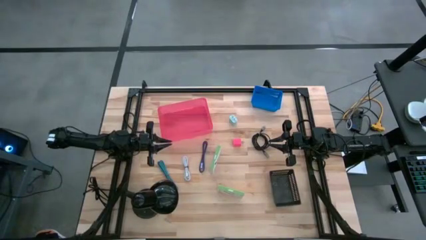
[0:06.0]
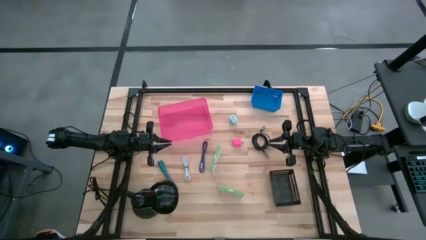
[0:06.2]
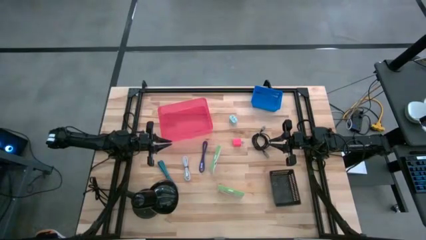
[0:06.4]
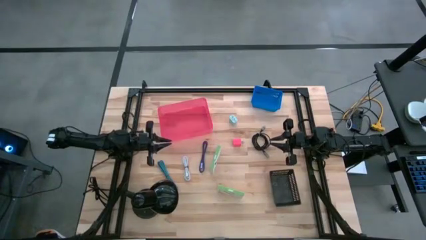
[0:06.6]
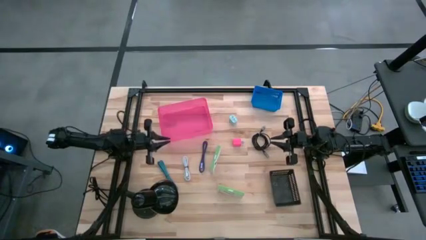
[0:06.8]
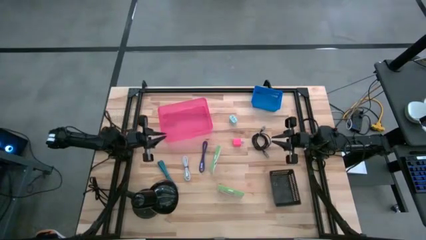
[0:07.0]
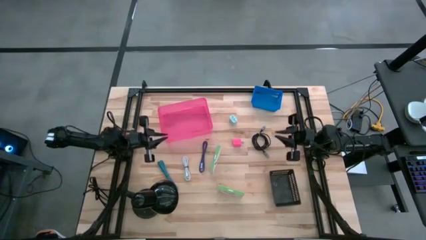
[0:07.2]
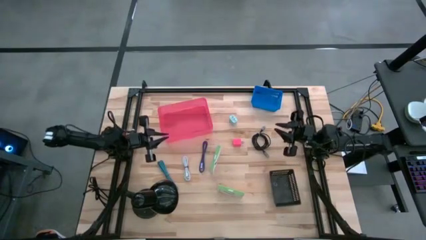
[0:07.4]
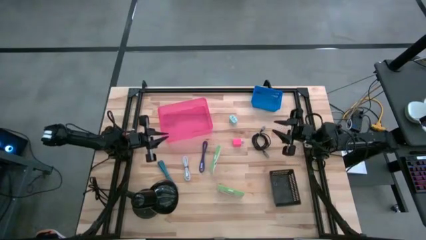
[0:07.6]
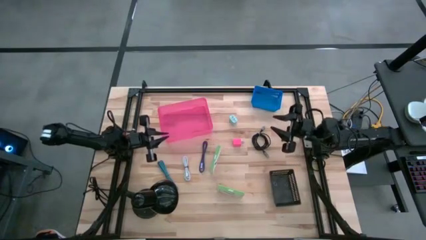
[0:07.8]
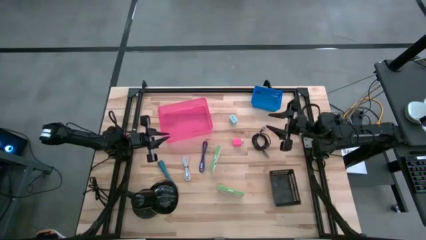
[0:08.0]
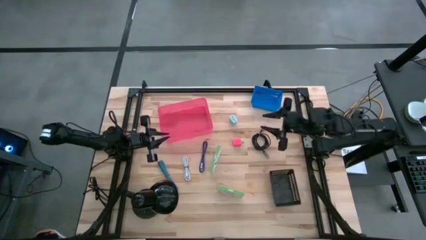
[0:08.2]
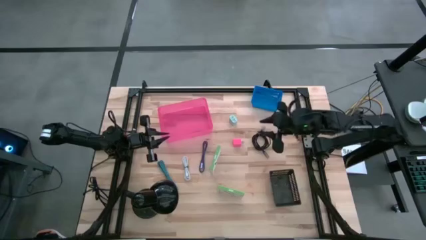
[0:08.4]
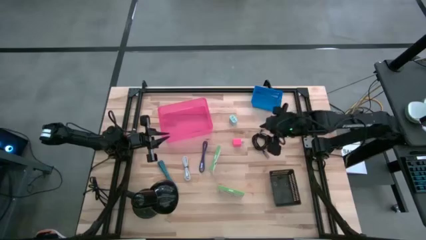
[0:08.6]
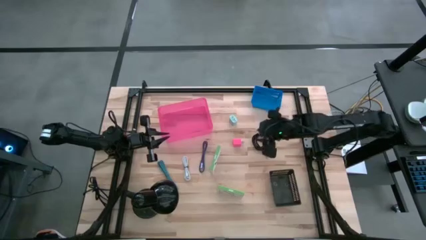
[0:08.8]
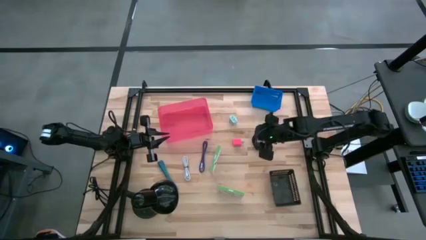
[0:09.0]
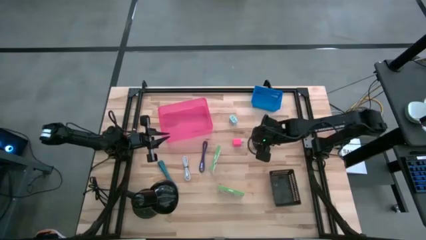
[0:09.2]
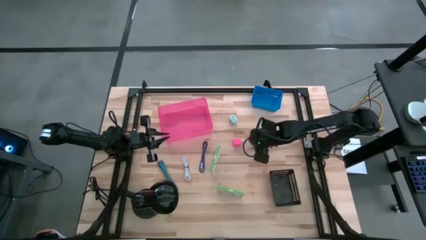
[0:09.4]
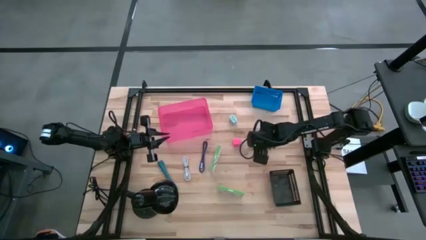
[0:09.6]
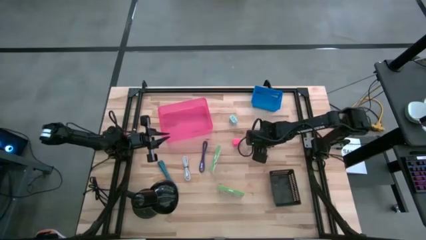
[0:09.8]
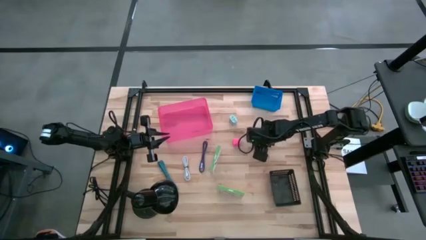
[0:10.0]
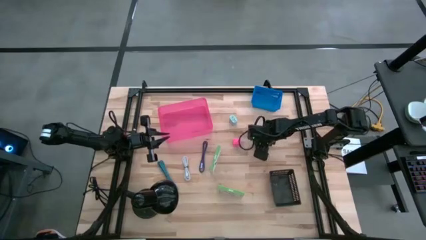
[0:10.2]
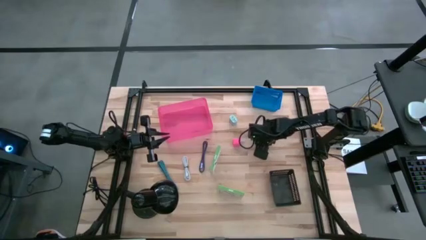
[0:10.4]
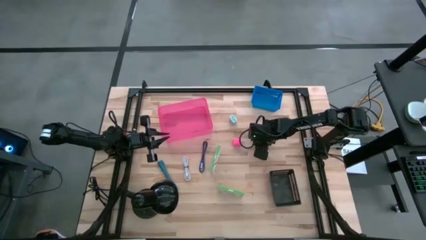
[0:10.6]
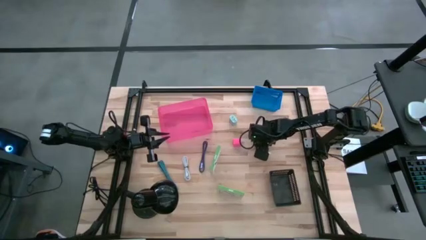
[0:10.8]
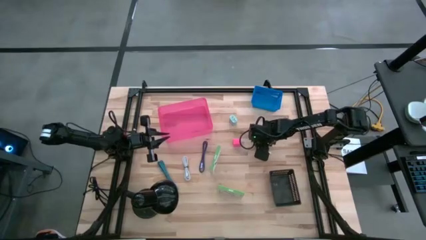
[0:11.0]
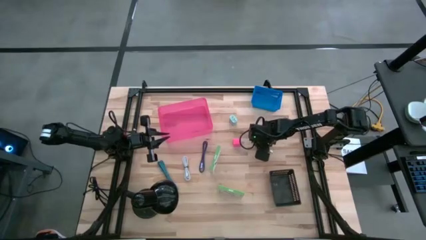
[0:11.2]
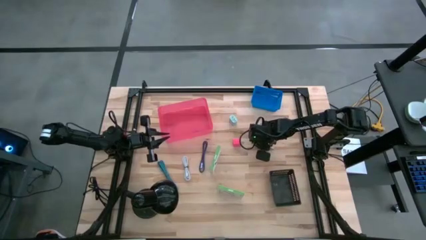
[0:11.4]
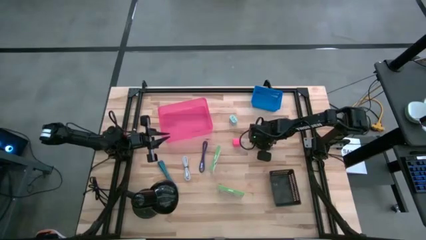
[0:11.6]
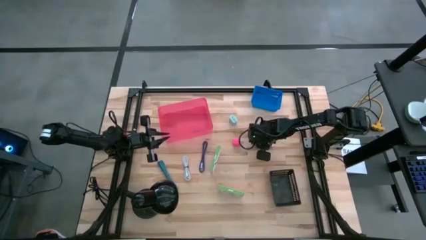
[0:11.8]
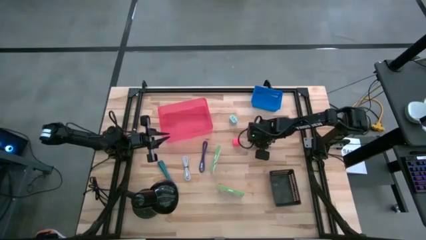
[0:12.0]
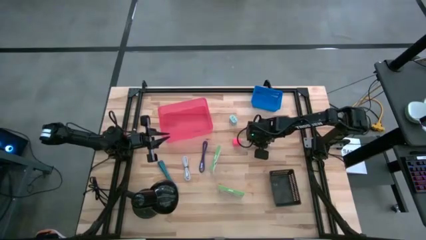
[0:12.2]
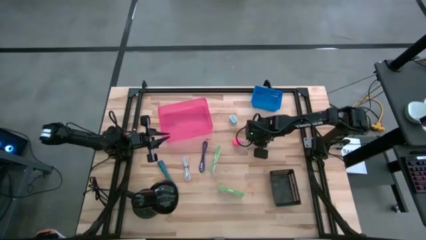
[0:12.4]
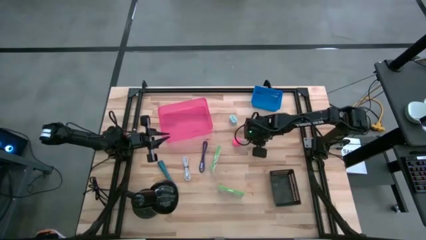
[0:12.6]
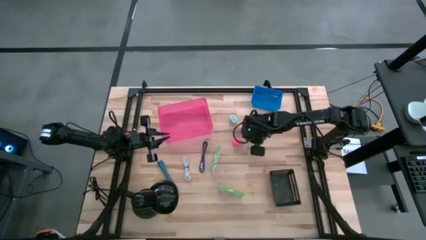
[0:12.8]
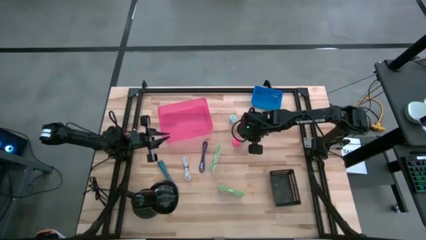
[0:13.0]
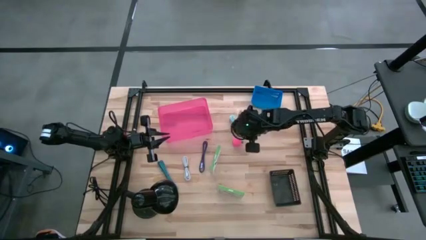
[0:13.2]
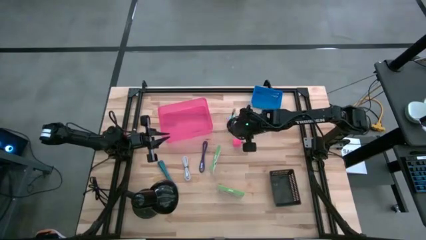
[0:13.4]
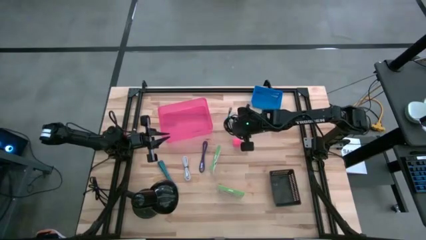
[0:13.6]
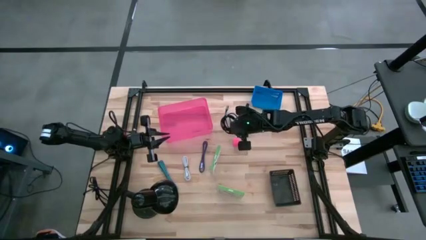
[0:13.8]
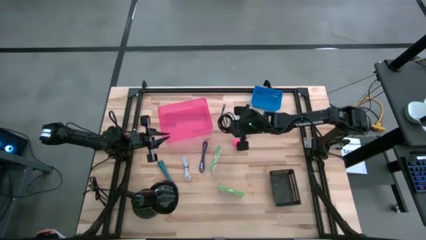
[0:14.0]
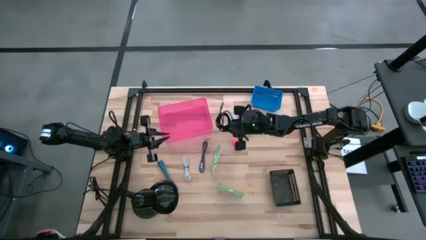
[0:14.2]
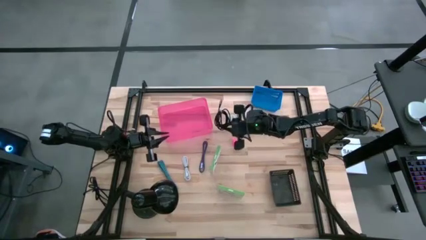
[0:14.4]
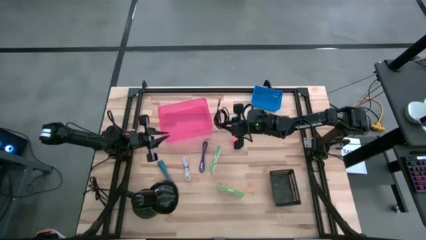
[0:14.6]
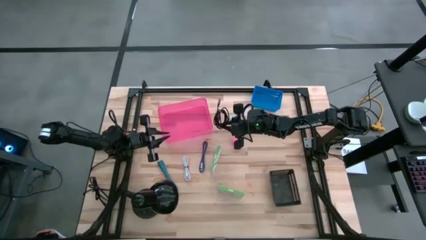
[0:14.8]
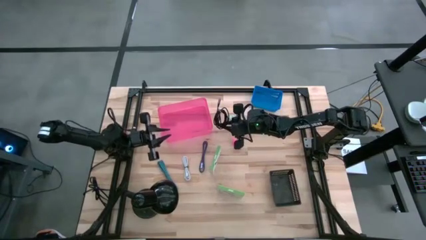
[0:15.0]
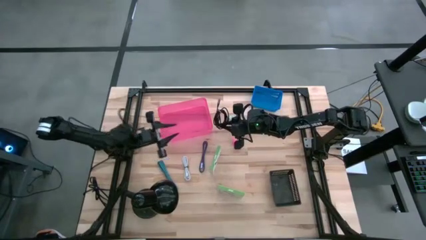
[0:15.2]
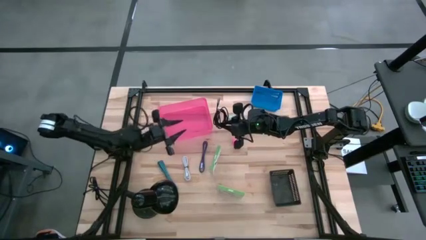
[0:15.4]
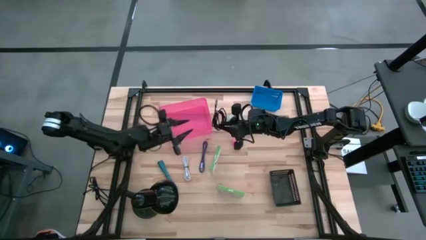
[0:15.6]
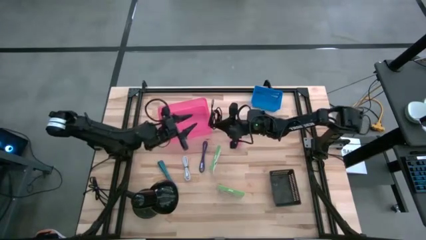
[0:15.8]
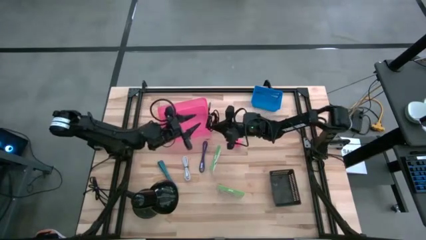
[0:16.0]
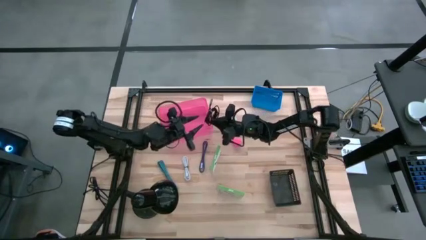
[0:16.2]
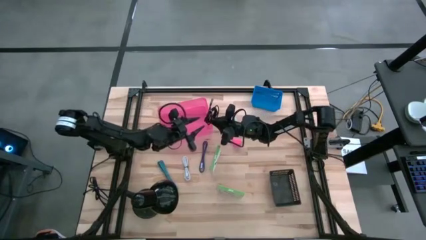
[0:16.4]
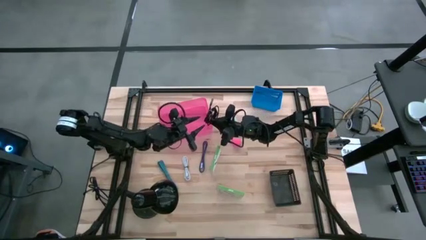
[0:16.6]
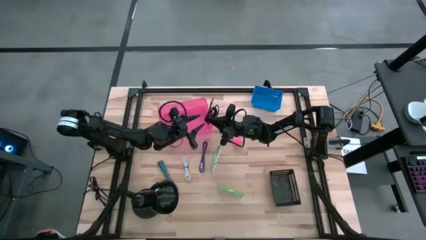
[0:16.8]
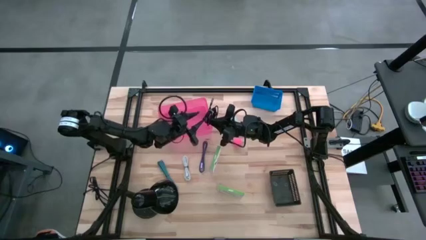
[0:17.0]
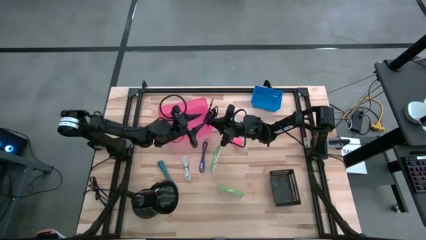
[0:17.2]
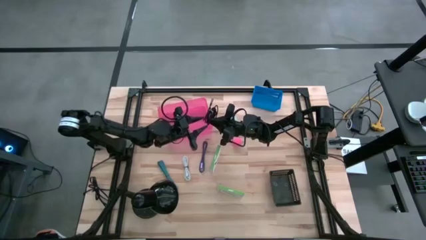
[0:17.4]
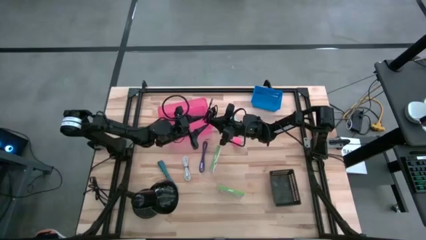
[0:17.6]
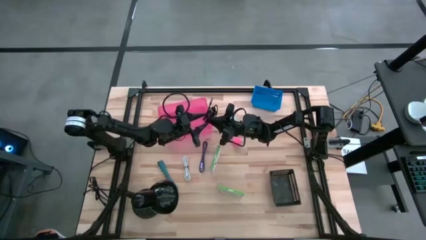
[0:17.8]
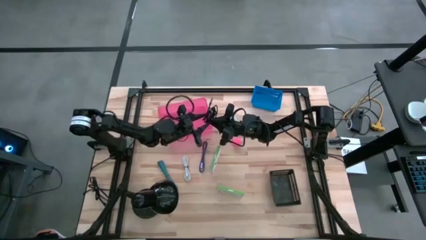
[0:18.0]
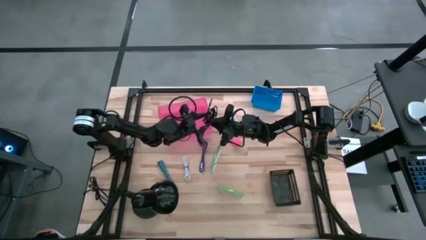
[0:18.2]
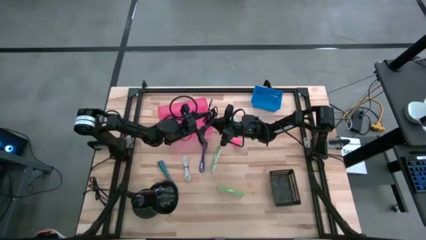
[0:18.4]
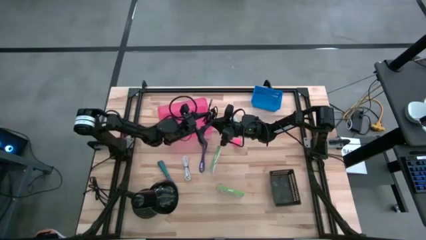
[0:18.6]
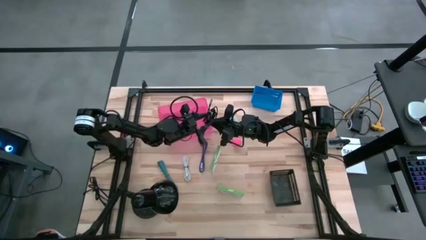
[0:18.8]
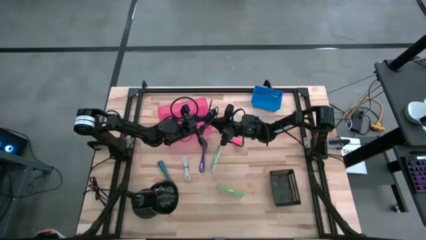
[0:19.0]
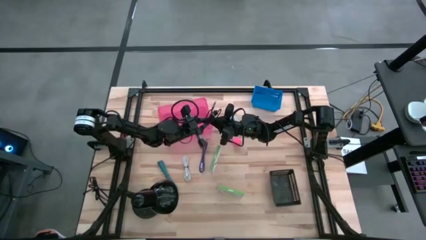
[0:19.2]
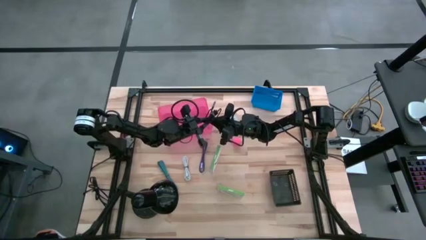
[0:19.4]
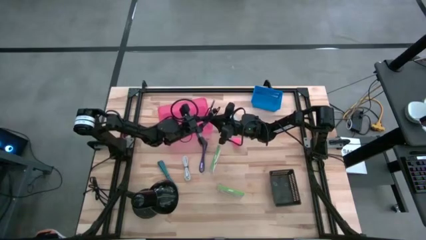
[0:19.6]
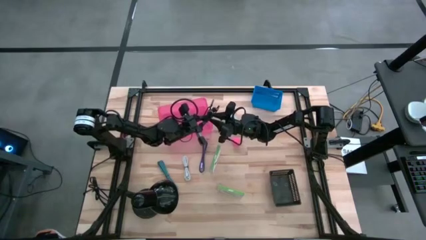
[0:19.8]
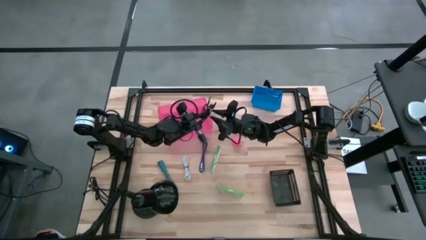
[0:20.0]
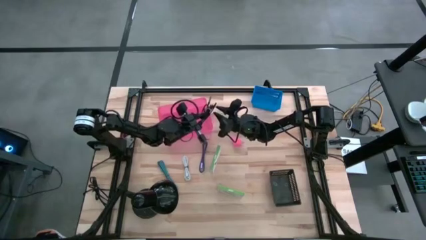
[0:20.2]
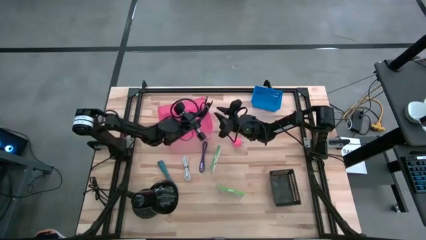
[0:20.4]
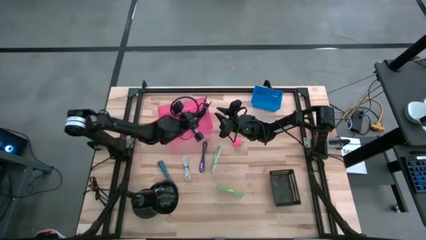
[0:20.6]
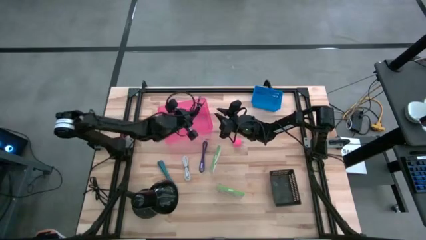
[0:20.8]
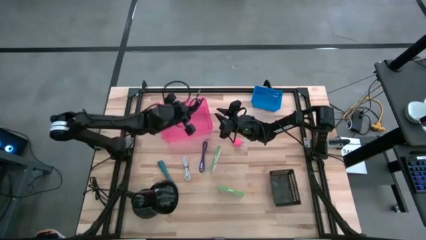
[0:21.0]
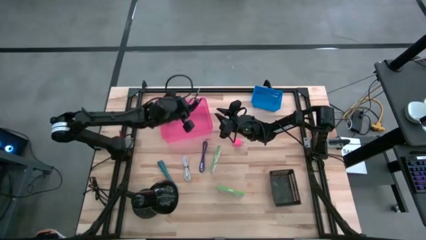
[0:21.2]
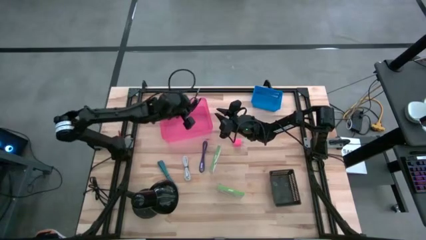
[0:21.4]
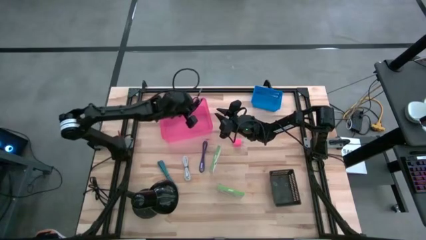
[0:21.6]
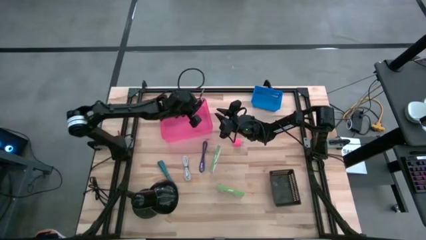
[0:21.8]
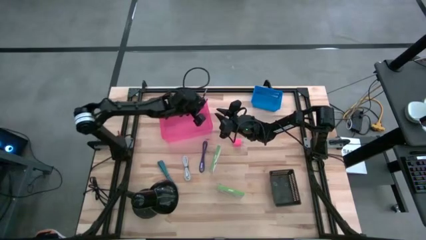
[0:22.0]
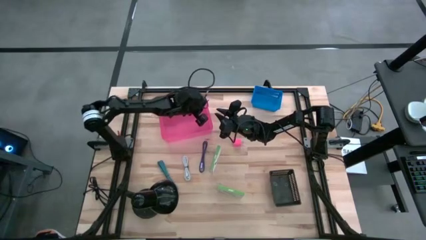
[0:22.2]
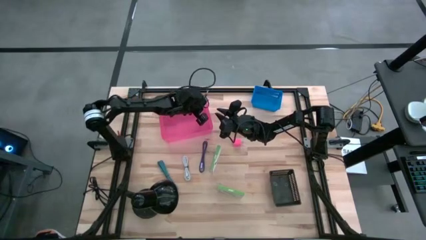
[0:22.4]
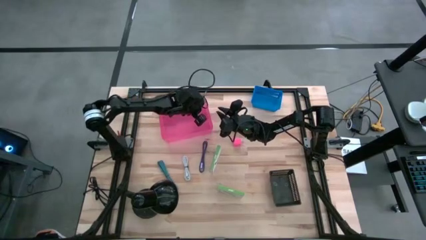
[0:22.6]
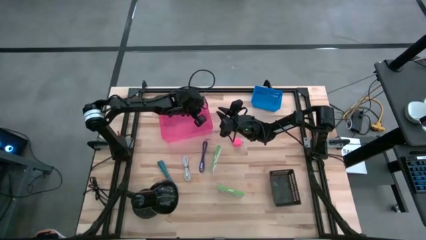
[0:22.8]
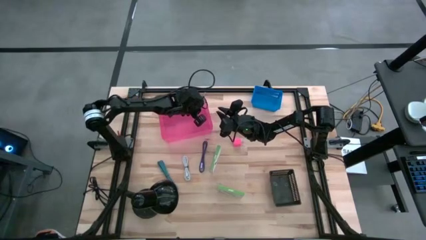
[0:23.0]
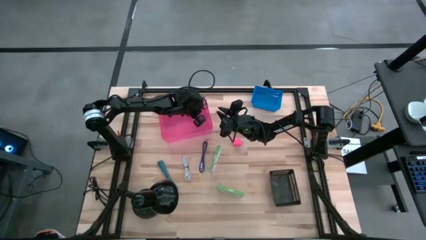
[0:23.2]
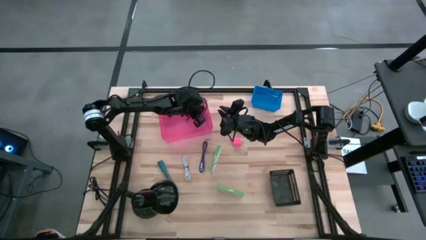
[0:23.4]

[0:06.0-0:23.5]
Task: Pick and place items into bin
Put the black cable wire into the pink bin
